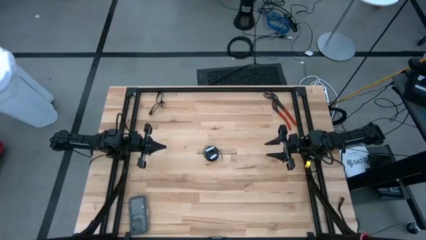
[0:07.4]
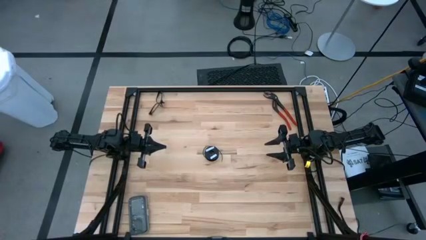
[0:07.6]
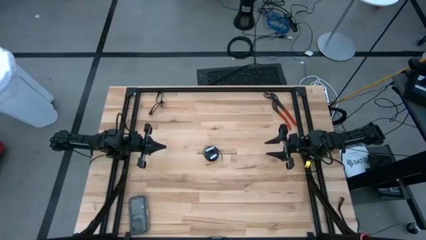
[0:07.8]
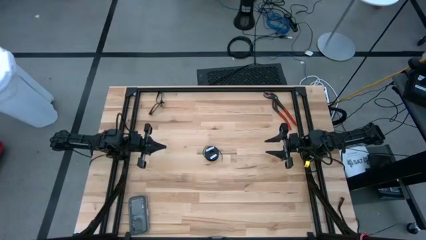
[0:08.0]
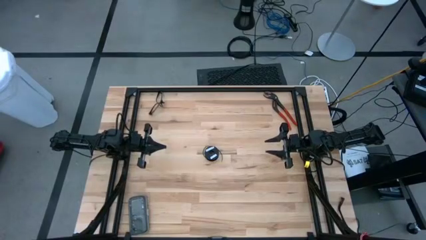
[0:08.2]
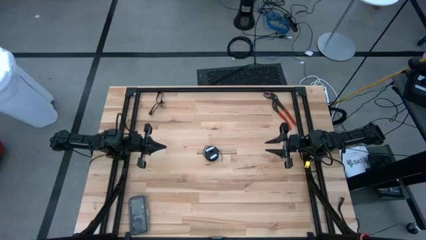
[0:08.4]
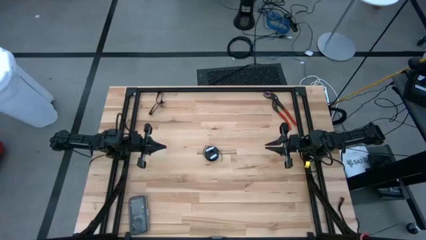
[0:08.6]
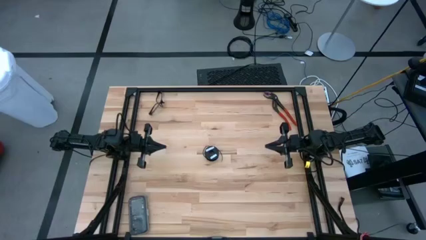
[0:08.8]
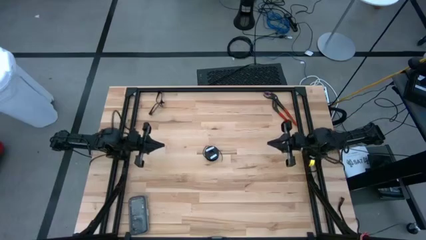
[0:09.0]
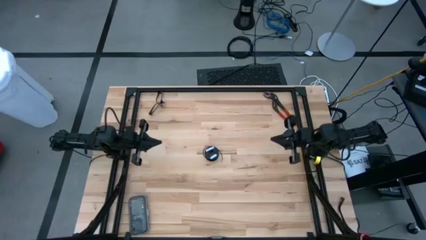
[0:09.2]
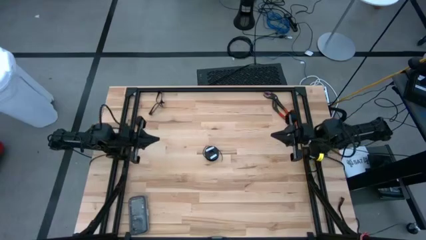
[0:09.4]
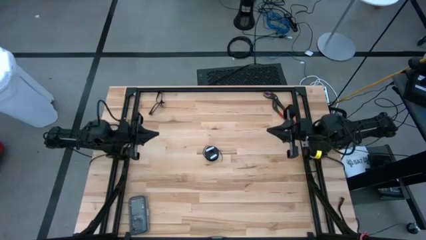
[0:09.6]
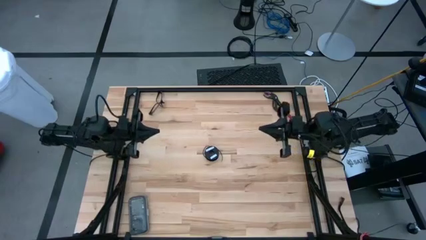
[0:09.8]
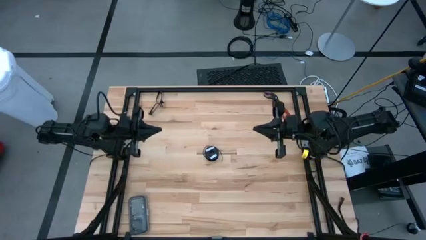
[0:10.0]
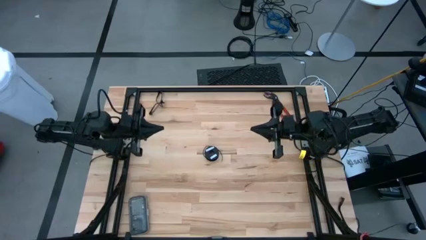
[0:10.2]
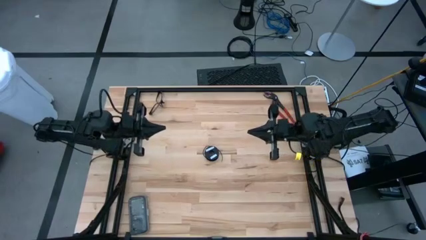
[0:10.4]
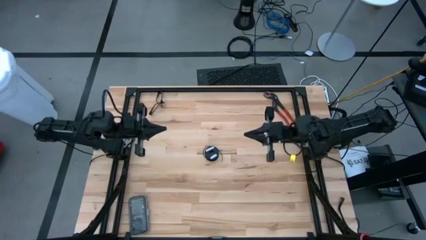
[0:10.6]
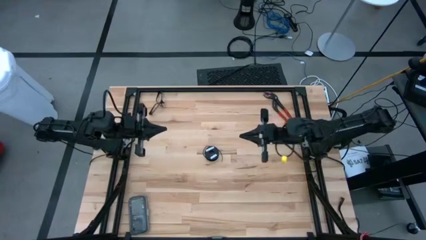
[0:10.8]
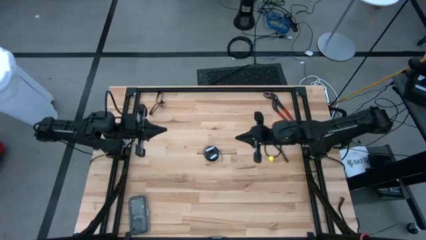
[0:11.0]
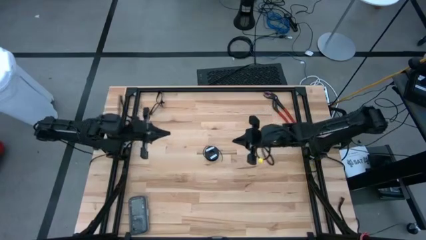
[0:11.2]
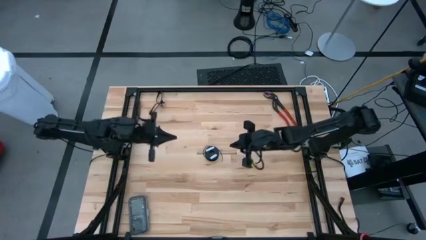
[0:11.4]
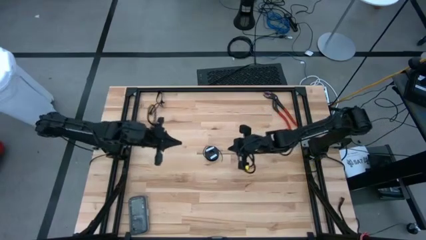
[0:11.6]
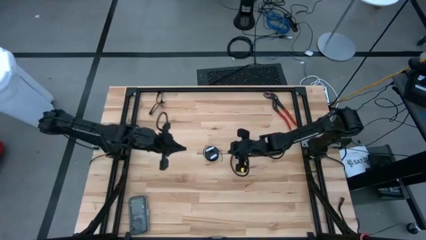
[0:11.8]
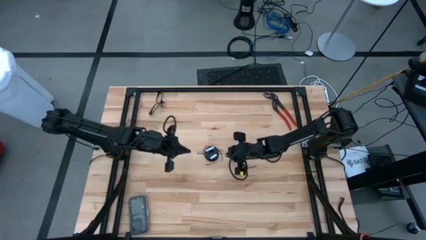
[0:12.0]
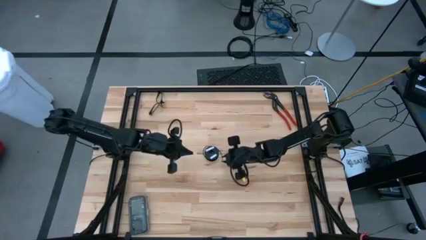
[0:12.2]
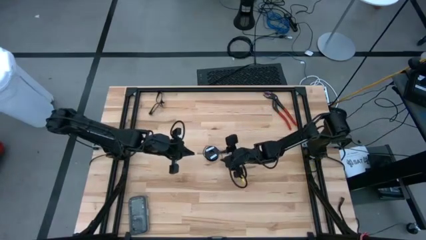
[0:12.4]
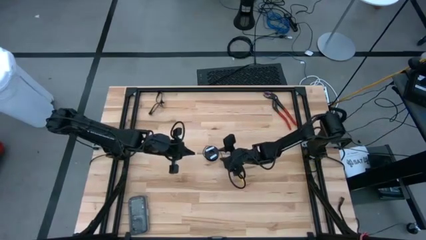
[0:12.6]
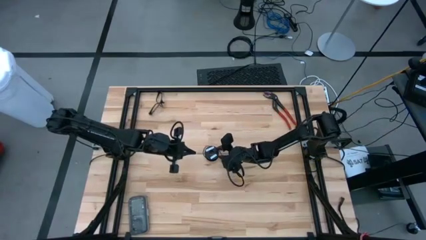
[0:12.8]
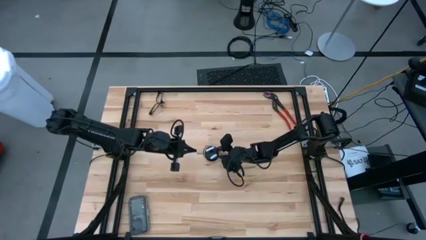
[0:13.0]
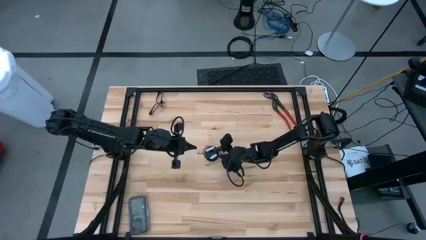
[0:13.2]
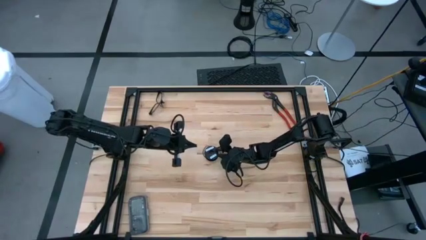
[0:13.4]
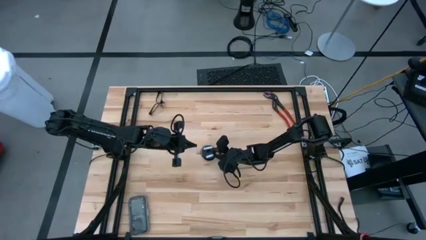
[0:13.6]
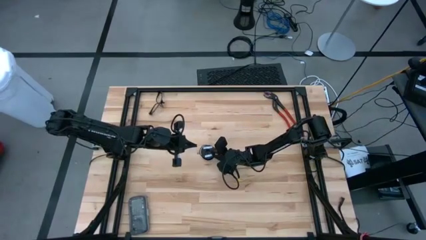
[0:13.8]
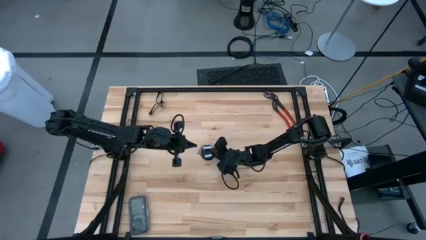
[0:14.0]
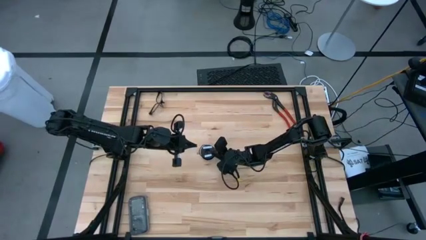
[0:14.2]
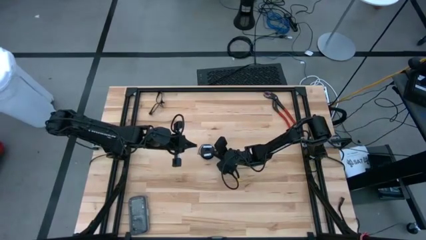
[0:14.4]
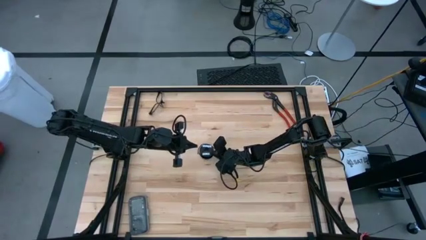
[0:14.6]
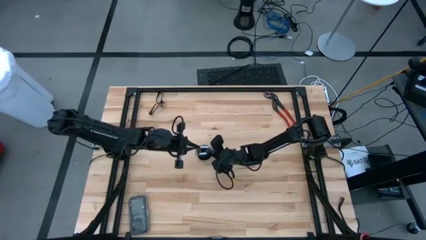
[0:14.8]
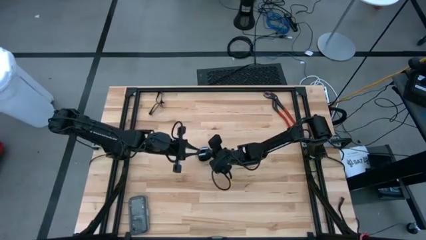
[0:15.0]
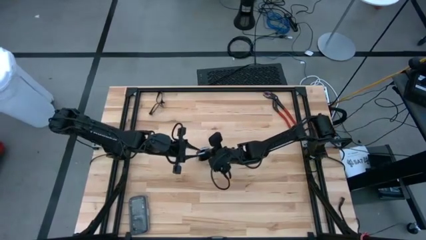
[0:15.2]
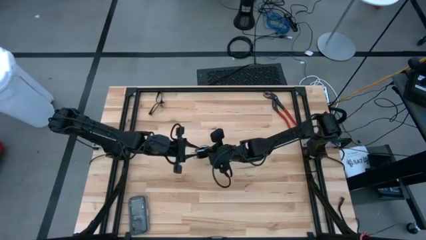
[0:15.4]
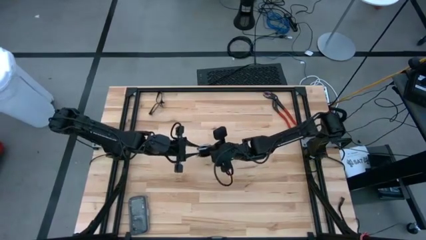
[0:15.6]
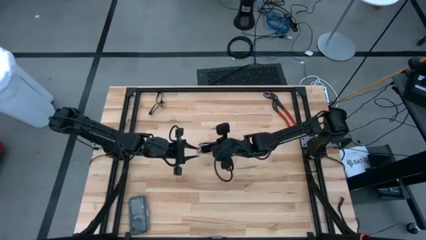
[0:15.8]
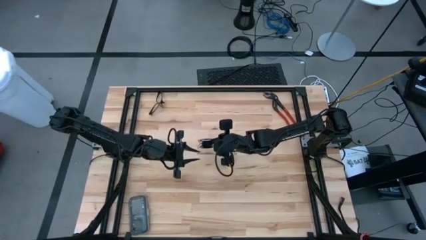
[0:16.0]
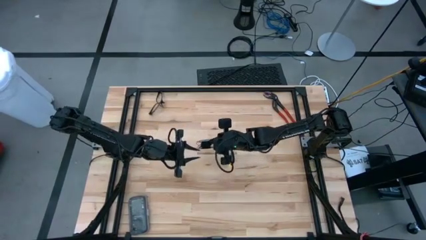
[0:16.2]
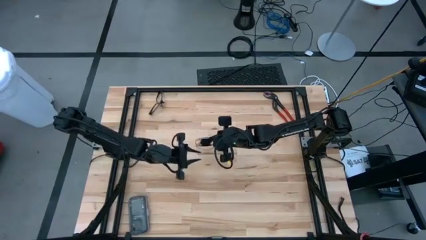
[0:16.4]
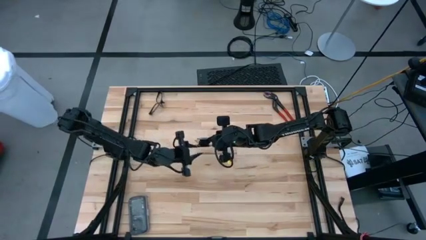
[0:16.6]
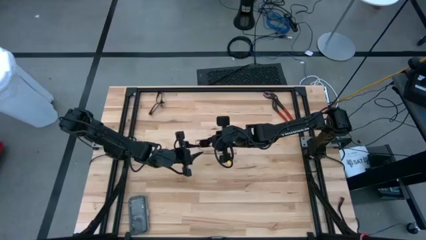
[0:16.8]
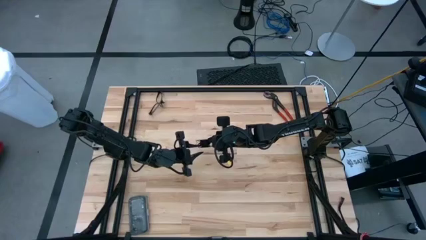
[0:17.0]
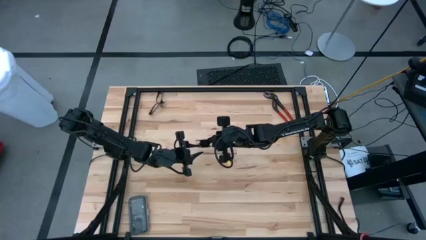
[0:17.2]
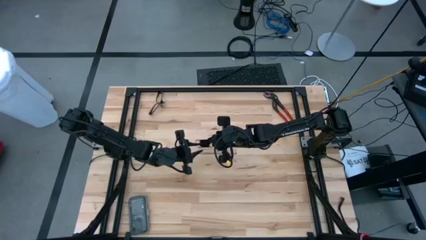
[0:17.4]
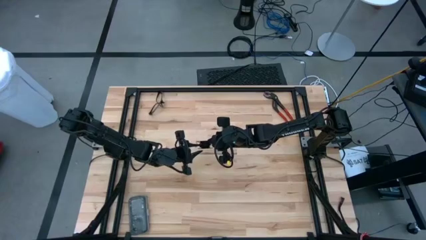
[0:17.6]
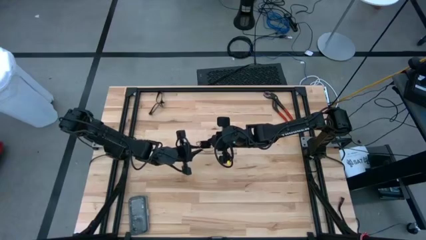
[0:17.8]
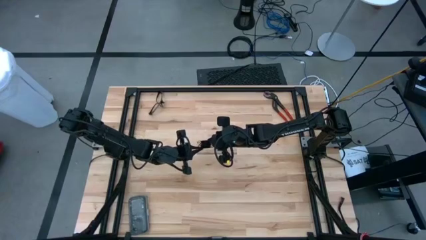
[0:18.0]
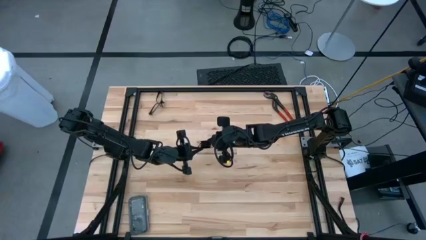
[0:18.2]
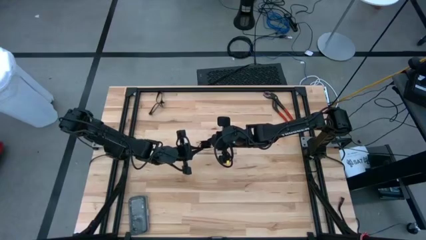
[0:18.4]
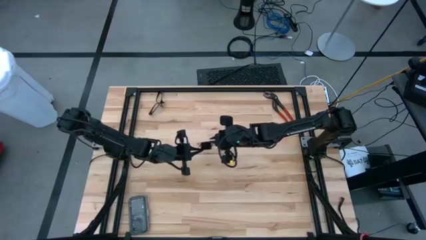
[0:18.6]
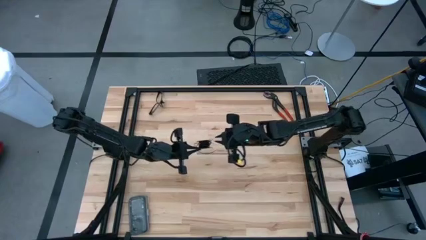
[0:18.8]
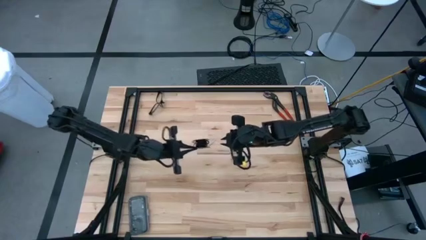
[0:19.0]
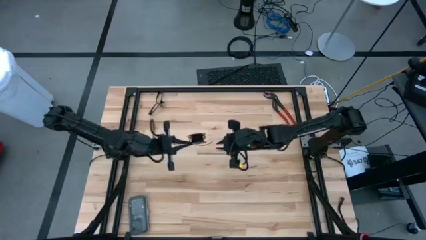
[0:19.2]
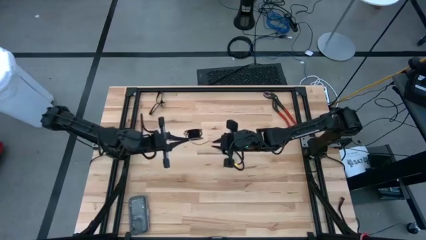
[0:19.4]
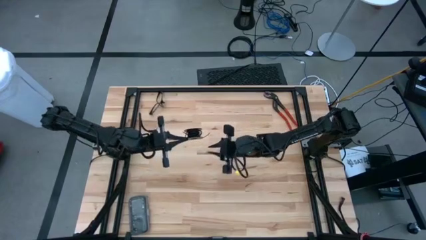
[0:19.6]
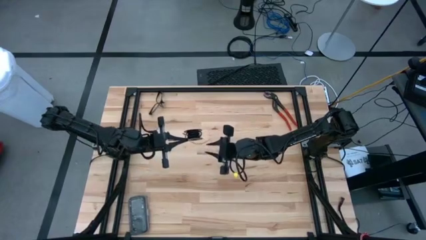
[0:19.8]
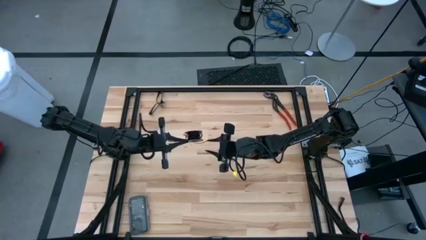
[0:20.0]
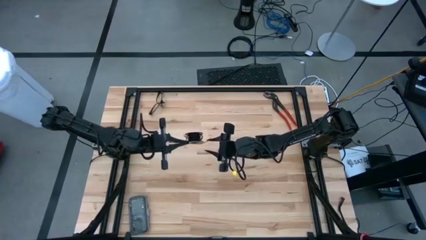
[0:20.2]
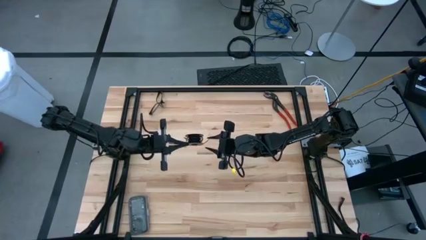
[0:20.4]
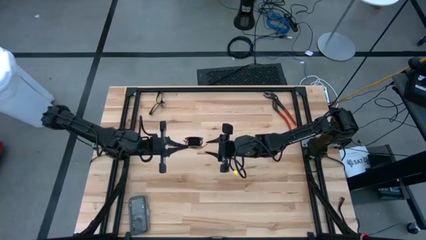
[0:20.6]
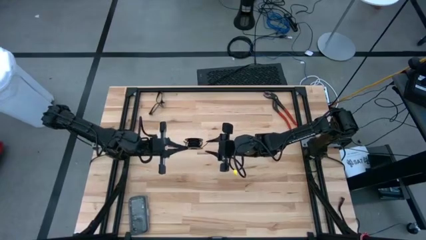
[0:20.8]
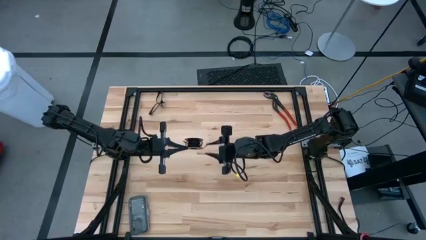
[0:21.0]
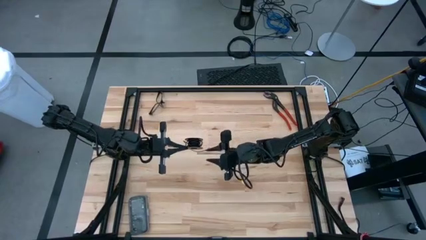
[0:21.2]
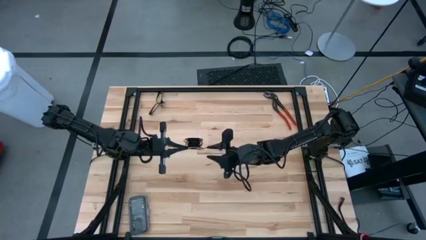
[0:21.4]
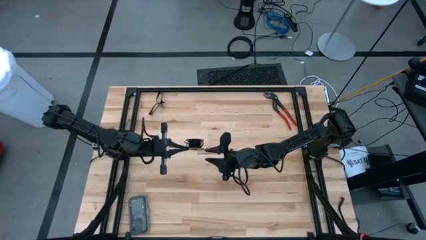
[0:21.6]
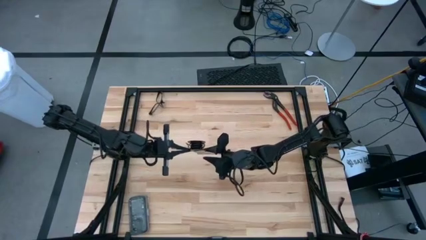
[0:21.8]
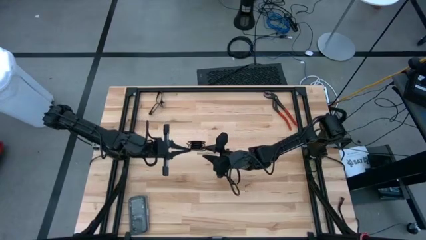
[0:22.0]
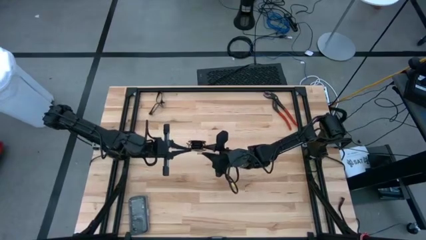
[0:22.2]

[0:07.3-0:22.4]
Task: Coil cords
Uncoil the black cable wire from the spool

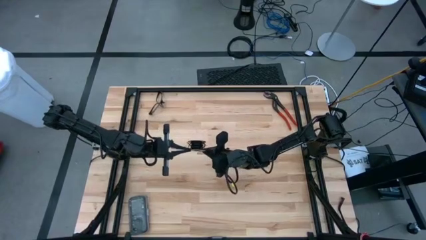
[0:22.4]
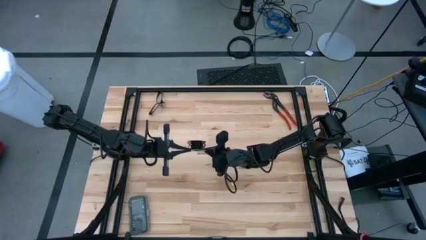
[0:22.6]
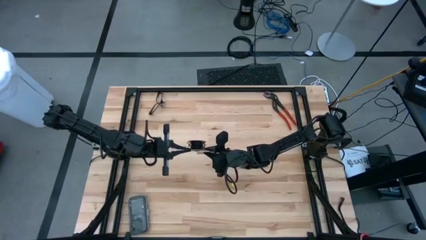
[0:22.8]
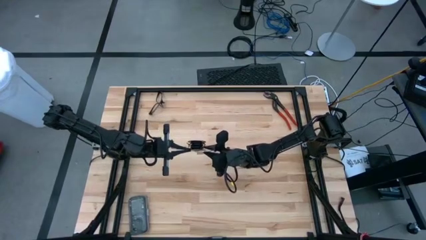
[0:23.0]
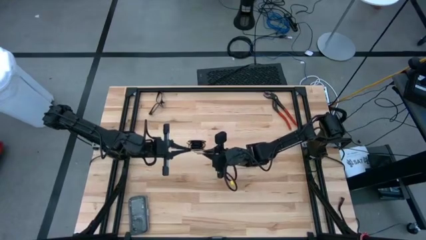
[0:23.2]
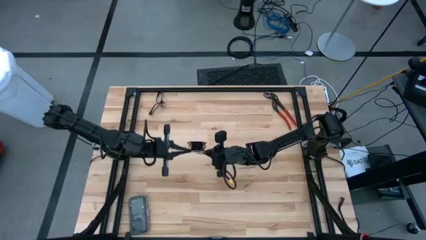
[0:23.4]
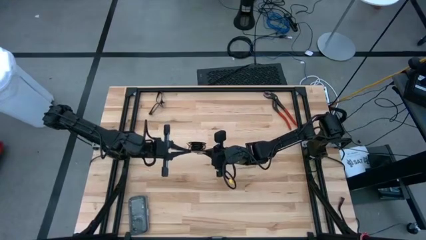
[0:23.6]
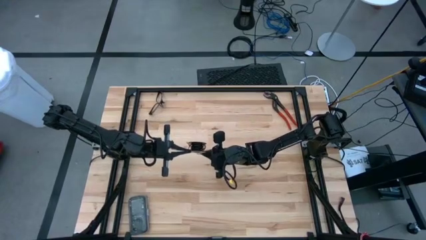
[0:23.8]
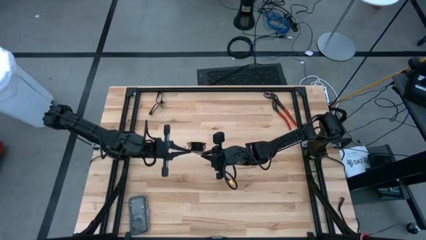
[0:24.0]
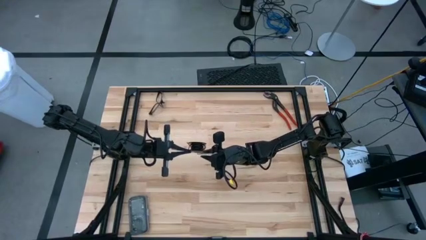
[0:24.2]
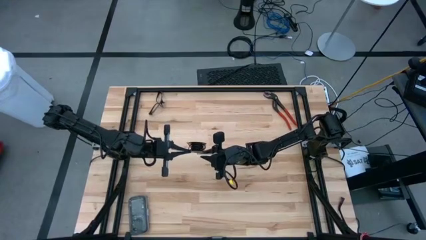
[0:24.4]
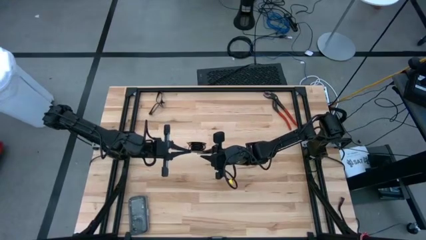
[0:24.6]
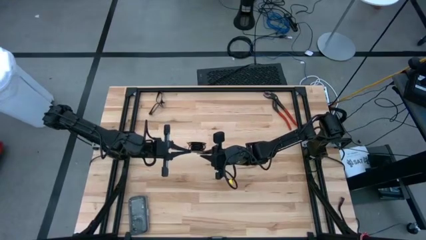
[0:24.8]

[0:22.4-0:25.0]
Uncoil the black cable wire from the spool
